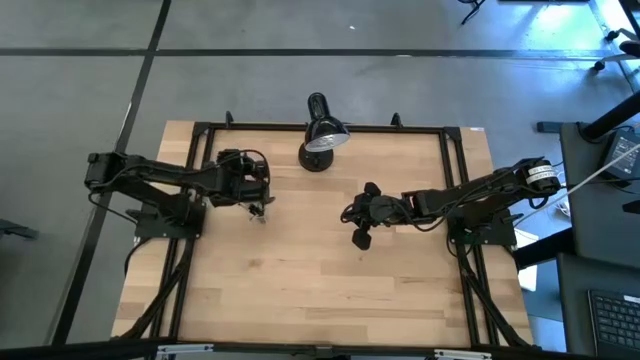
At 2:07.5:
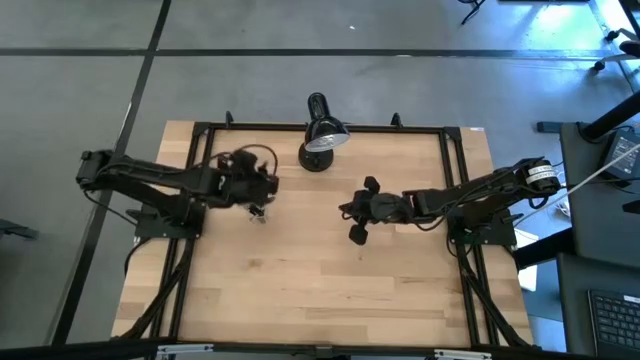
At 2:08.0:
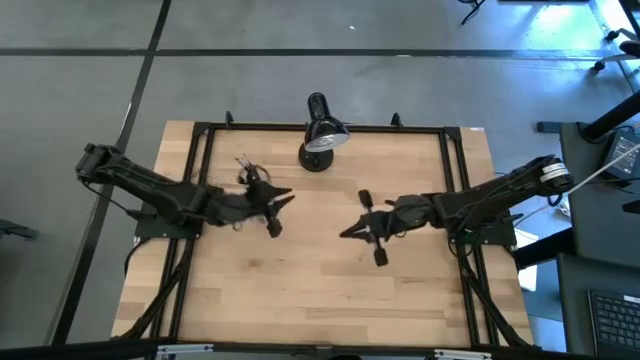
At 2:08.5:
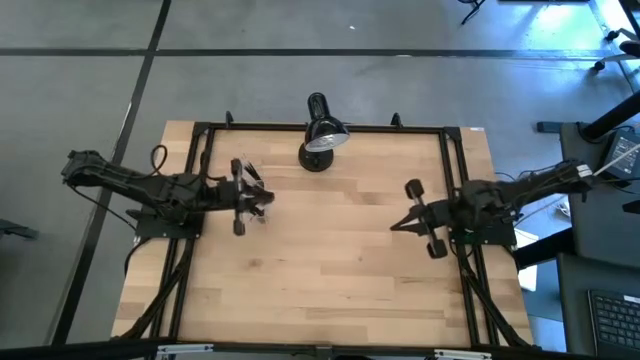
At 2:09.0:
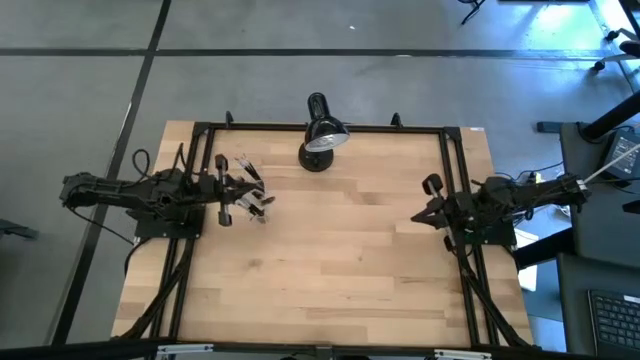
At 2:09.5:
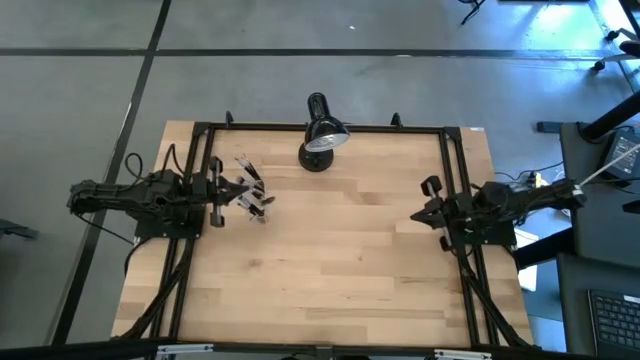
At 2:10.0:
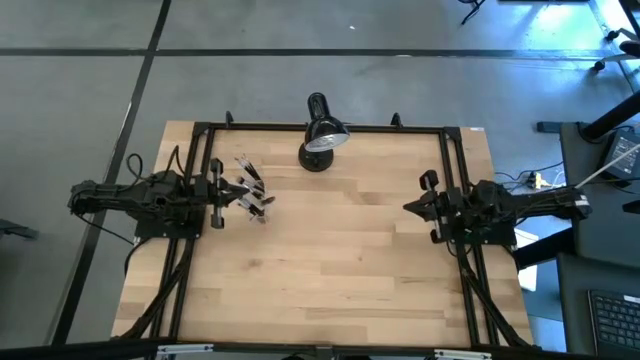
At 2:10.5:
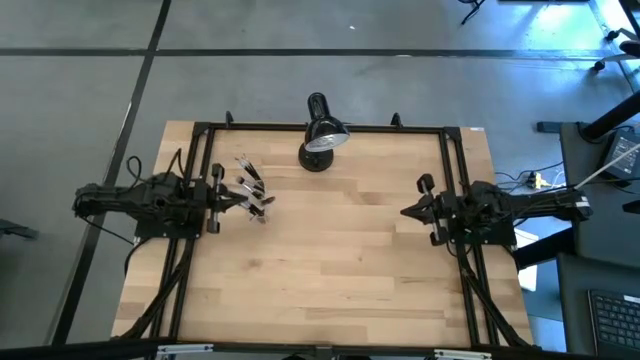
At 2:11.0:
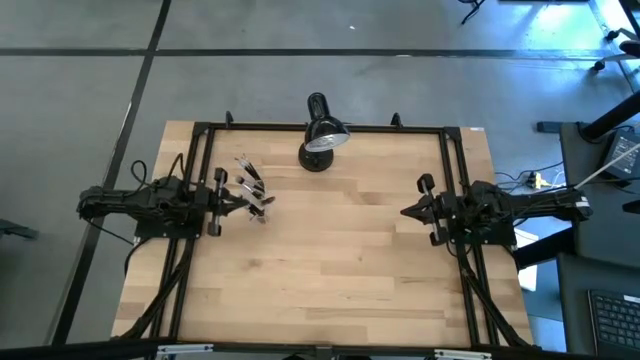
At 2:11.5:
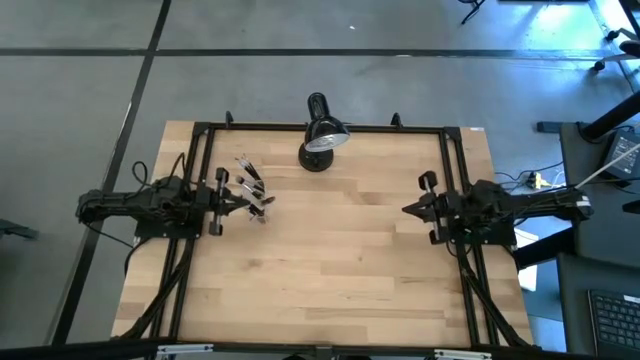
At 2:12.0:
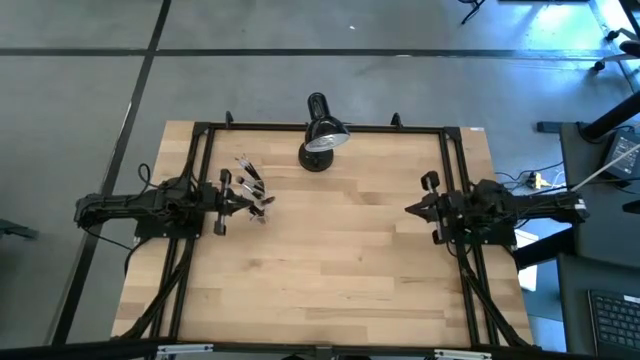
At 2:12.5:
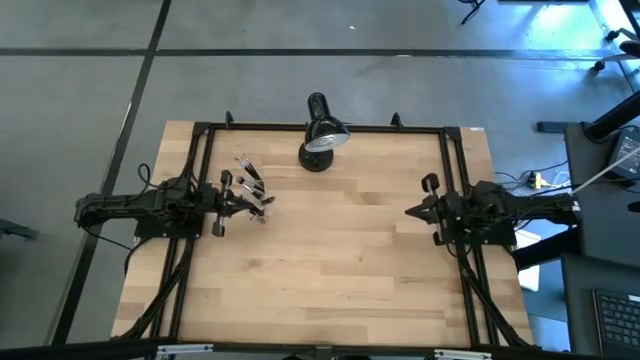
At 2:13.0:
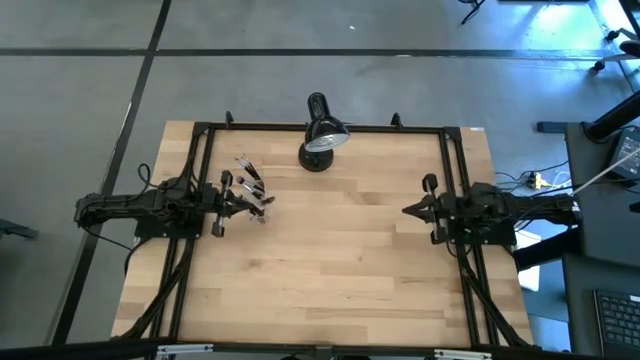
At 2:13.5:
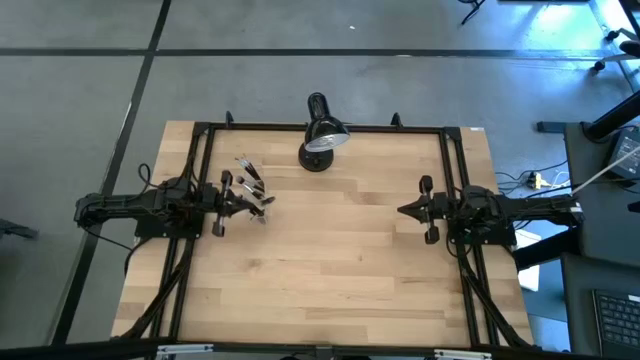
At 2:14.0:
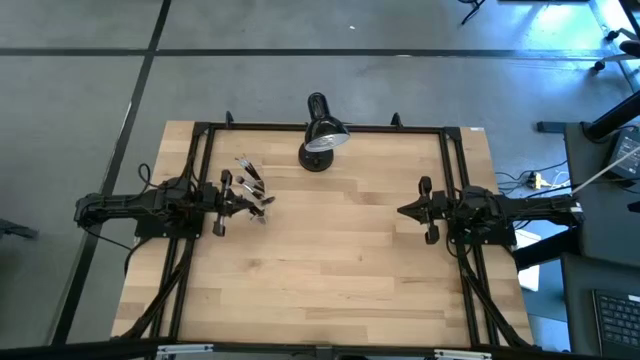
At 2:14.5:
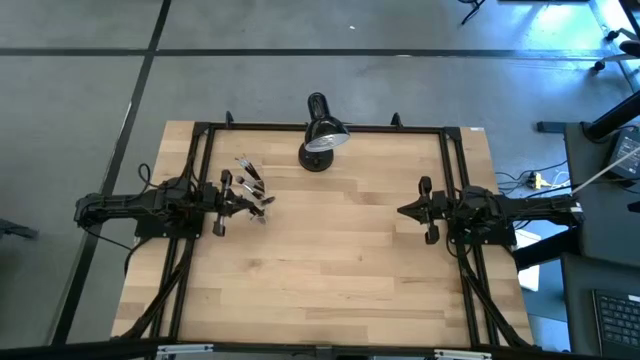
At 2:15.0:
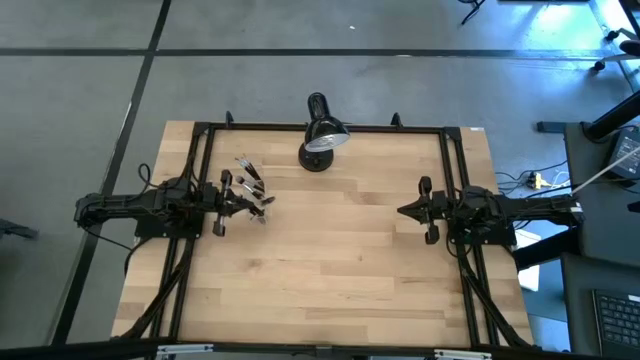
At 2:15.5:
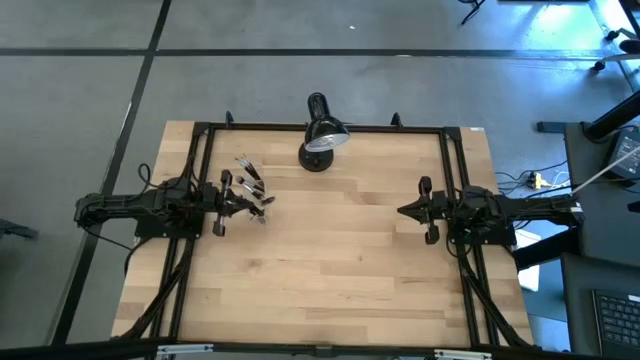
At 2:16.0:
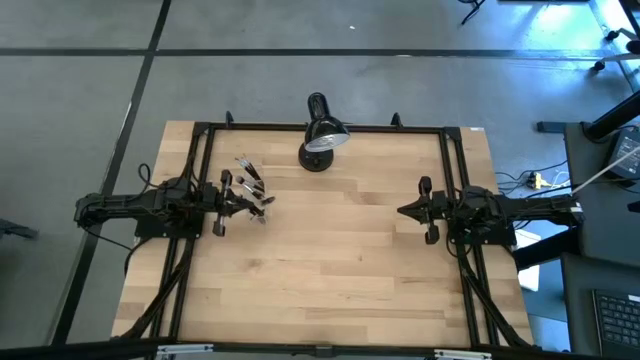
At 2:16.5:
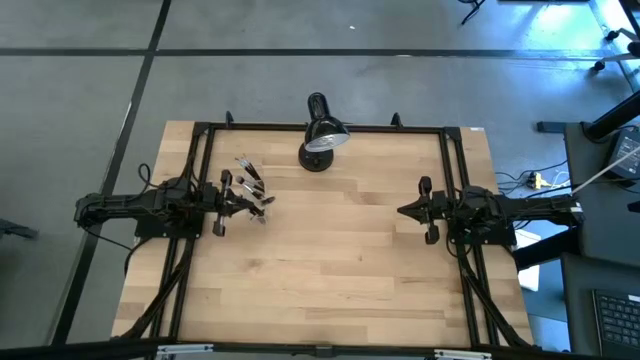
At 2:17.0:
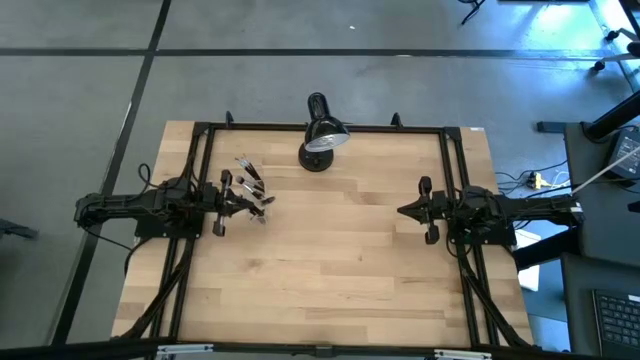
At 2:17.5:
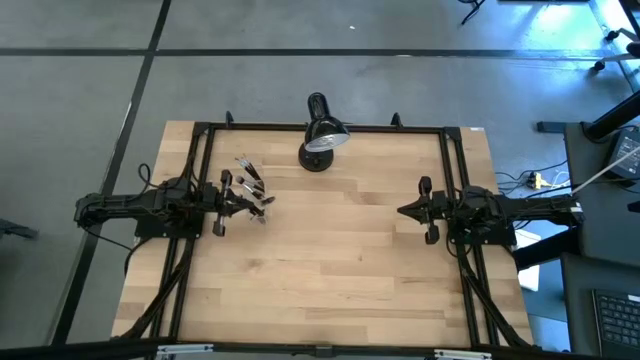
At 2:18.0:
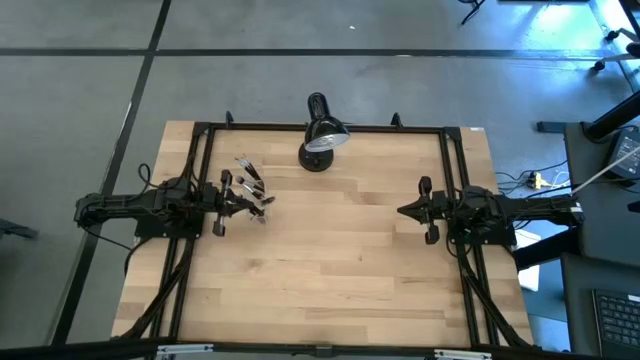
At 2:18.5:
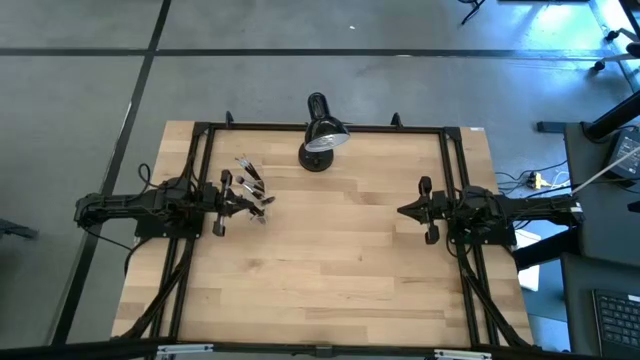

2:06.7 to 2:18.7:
Task: Sort items
Return to Home Position

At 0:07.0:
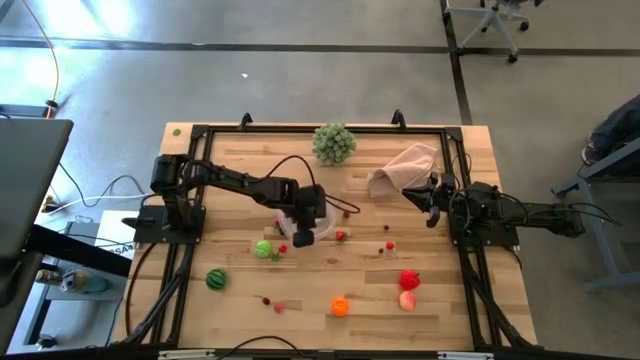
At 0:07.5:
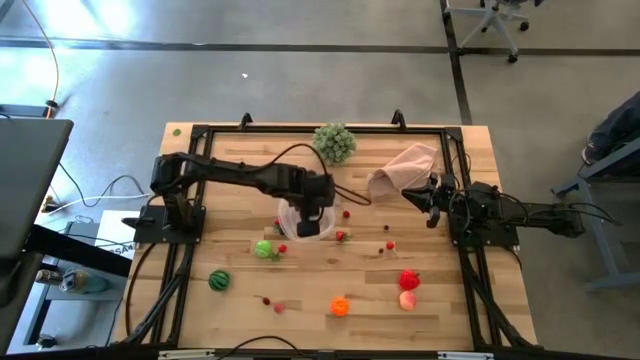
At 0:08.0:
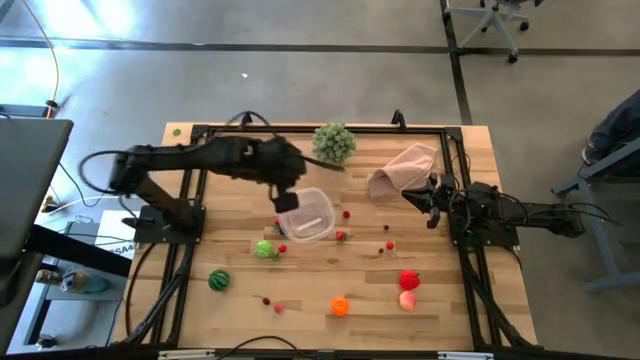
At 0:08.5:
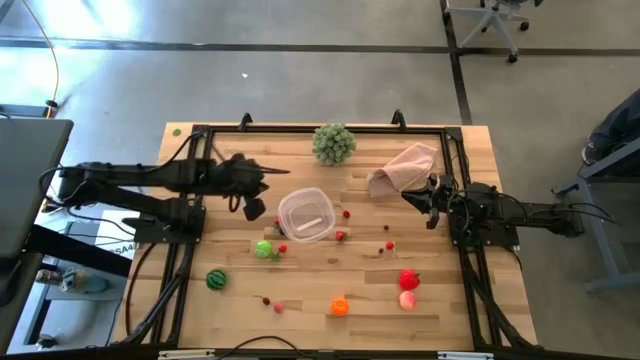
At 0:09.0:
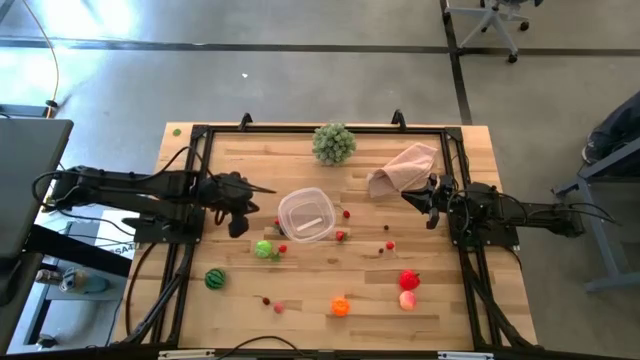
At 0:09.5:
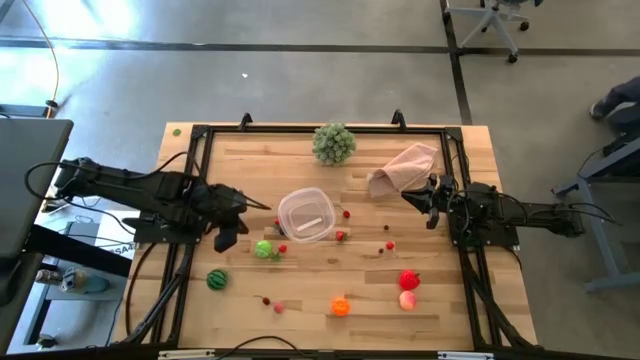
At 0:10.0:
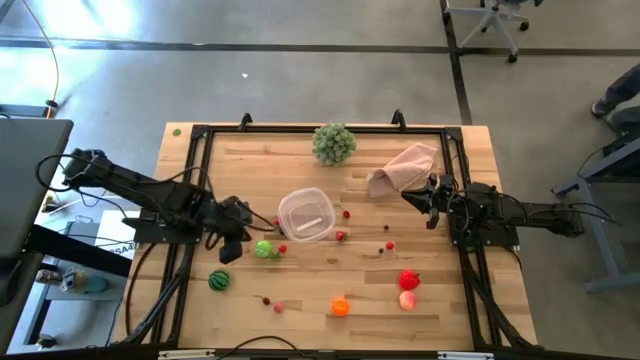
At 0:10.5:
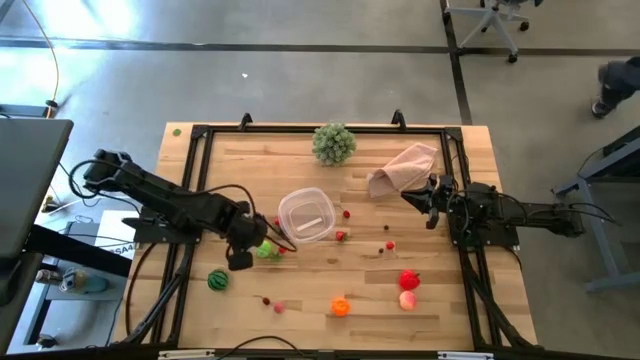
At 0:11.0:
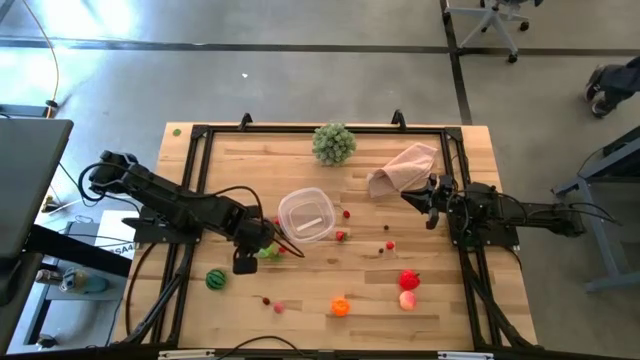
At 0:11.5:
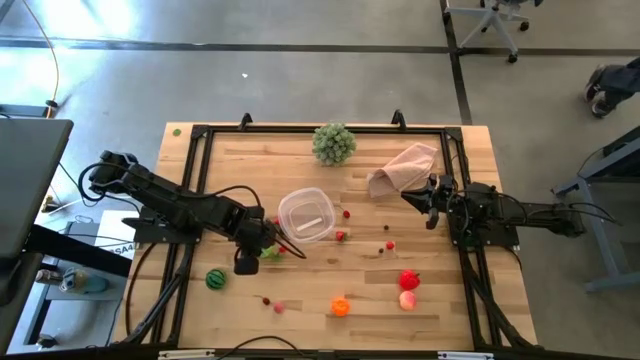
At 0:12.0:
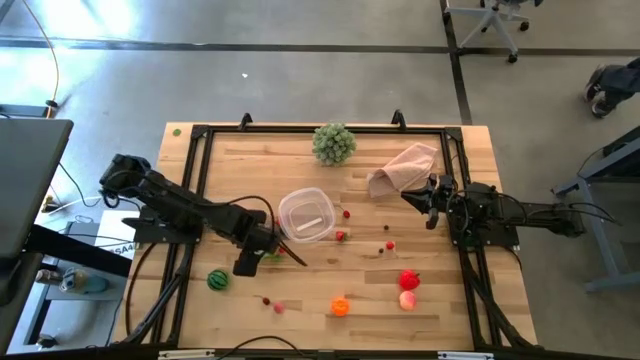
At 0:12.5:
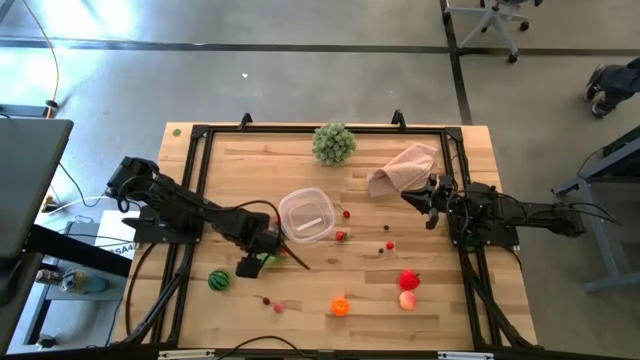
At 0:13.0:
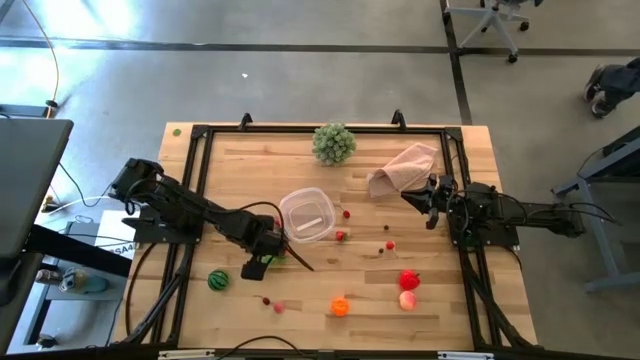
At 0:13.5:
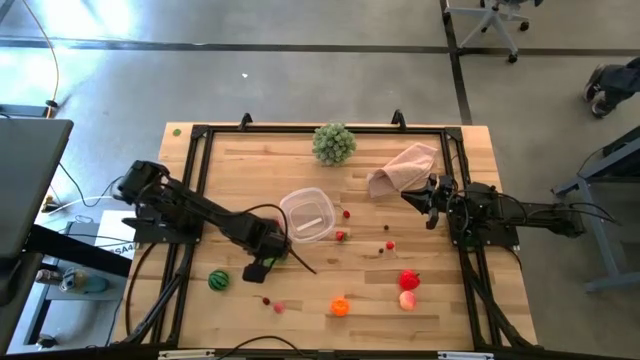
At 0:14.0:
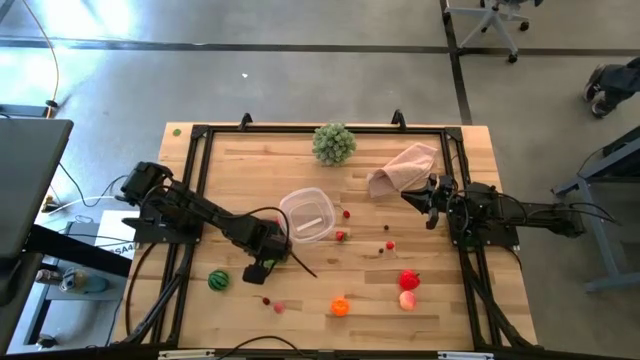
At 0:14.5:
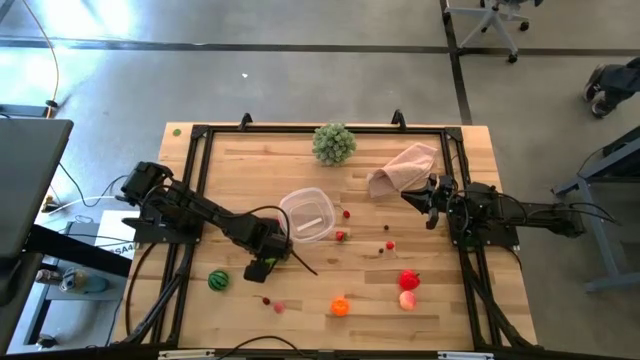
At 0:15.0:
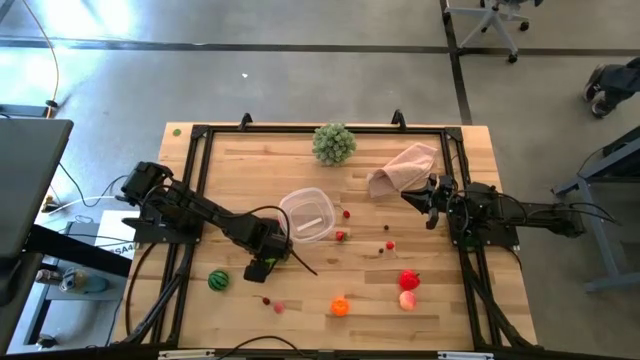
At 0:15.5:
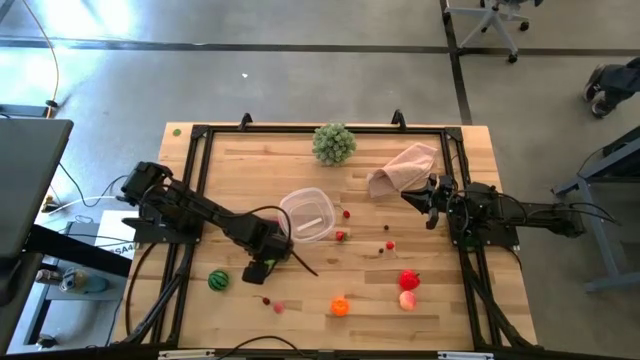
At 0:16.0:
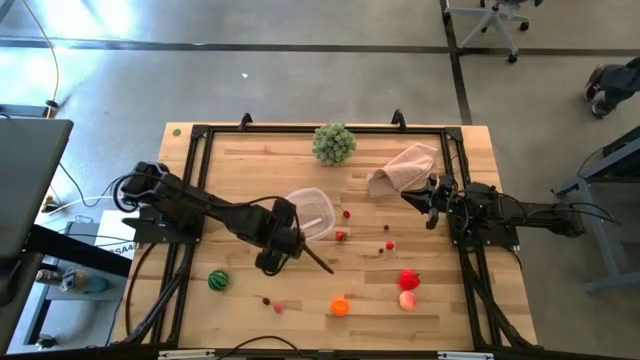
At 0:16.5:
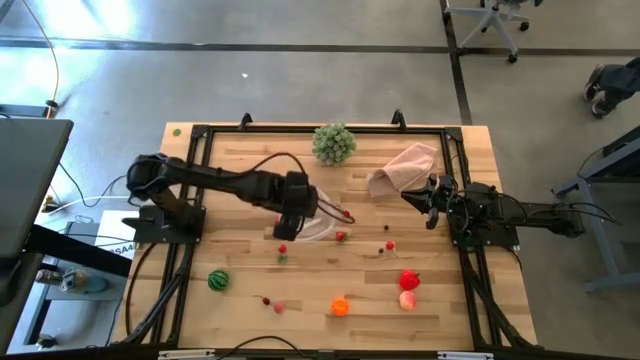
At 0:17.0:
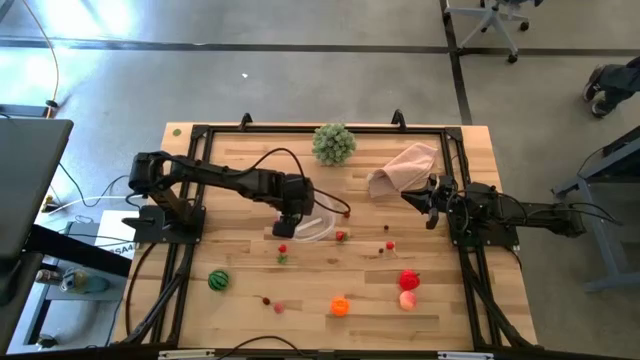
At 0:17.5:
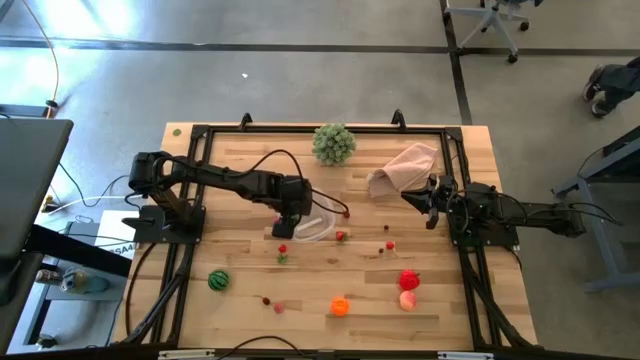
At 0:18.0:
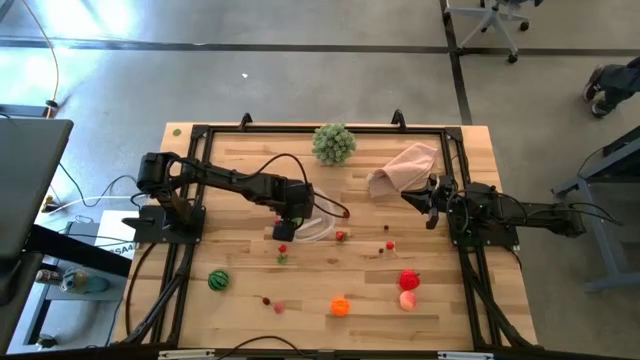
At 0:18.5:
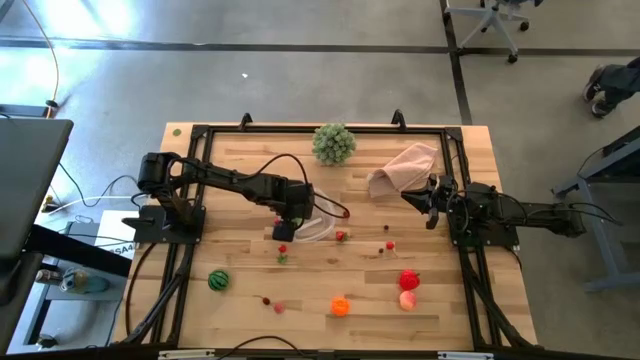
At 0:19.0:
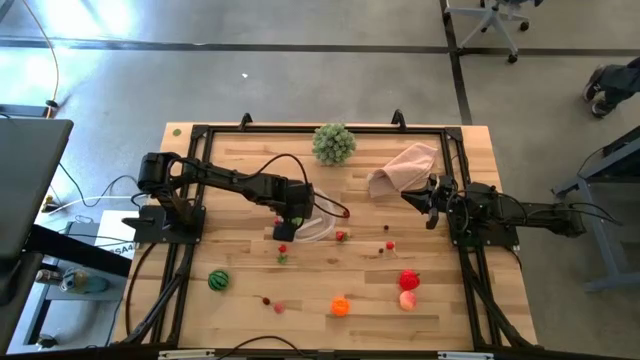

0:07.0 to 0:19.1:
Task: Pick and placing Produce into tupperware
Put the green cabbage into the transparent bin
